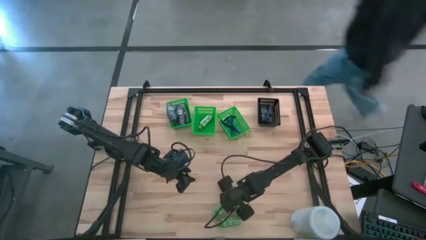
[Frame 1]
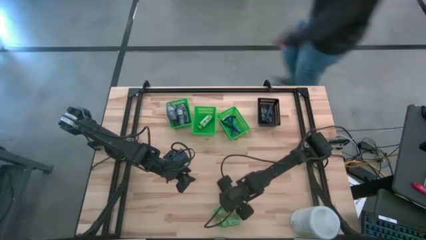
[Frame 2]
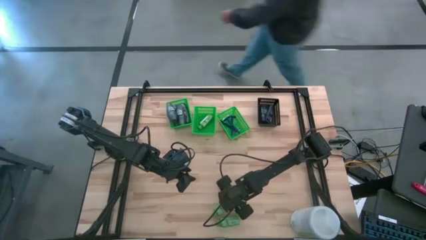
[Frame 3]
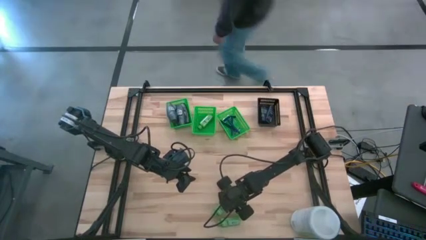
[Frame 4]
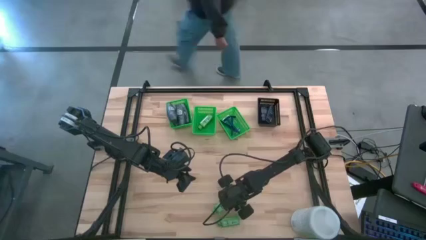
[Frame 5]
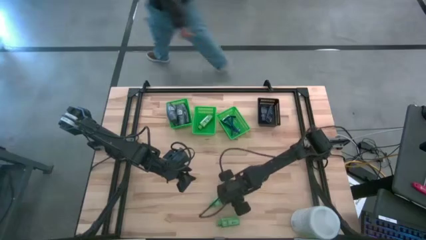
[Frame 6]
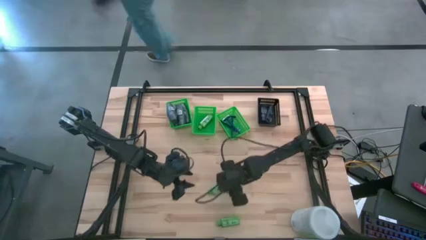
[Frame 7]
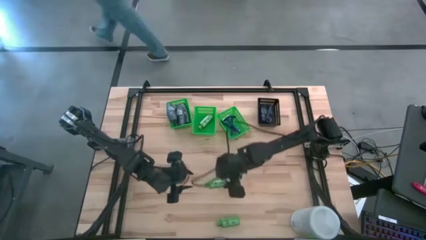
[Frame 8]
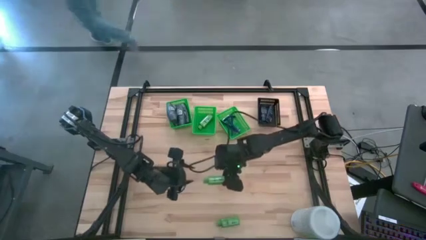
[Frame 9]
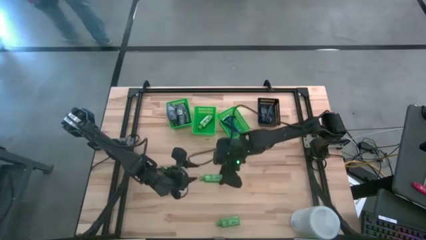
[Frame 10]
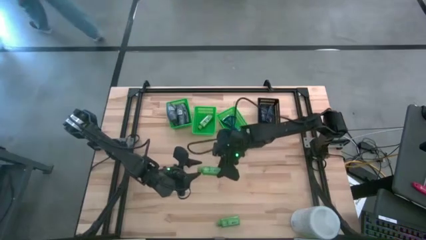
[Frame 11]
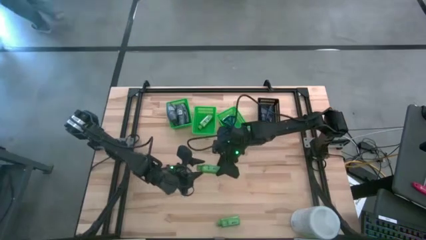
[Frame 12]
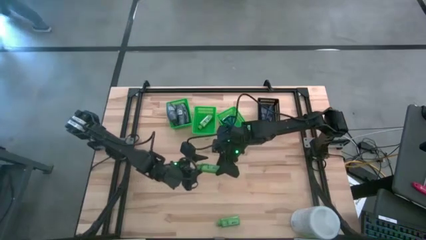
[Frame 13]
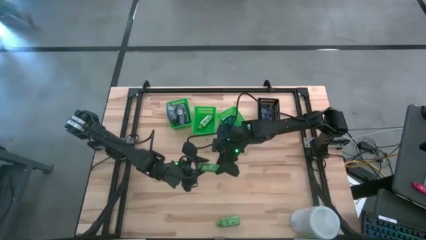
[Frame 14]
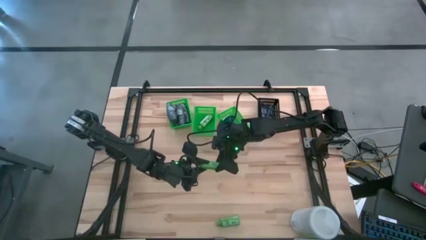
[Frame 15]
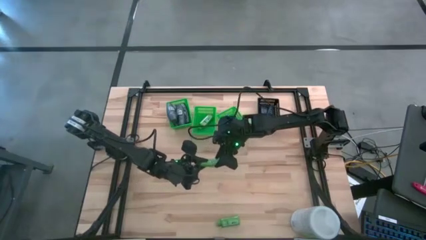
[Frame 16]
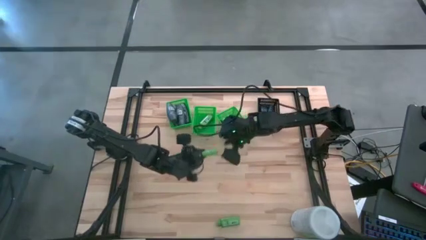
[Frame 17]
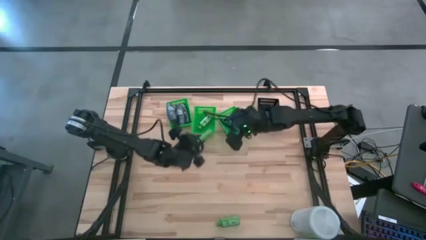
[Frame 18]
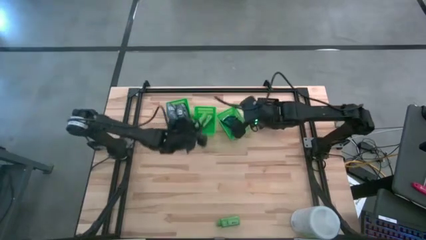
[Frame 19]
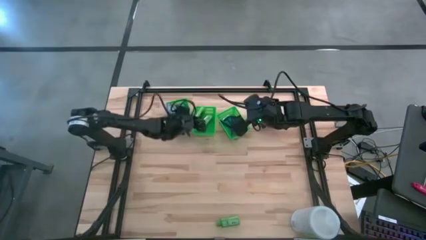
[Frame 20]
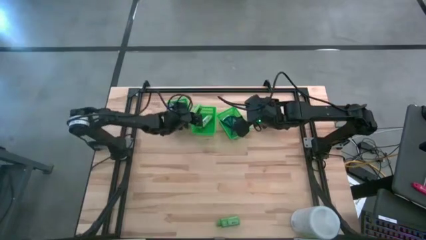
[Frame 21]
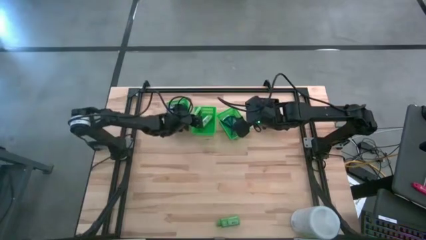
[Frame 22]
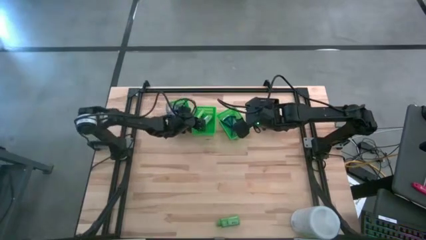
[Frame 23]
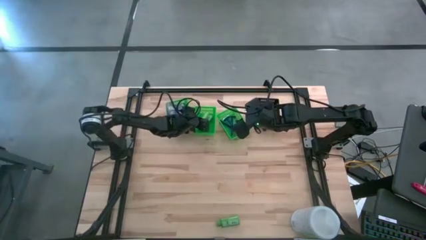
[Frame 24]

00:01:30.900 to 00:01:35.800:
Task: Pick & Place Travel size toiletries
Put the shampoo into the middle green bin

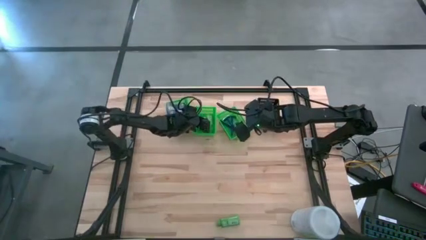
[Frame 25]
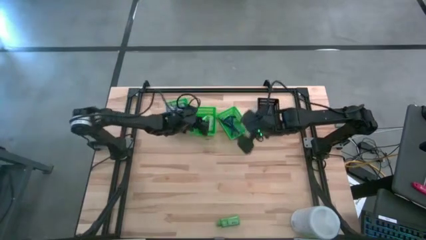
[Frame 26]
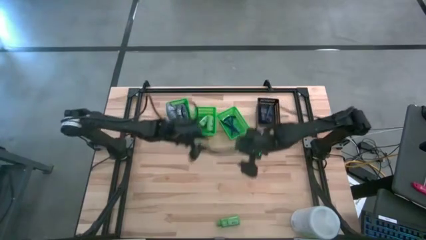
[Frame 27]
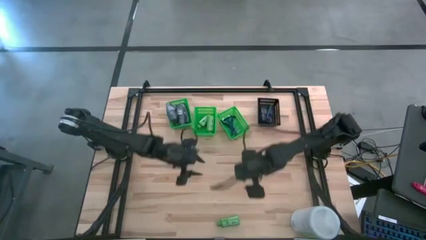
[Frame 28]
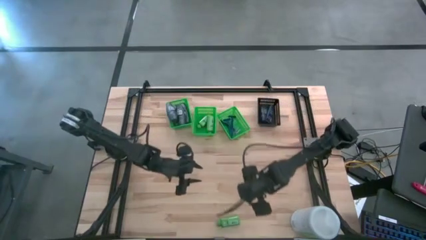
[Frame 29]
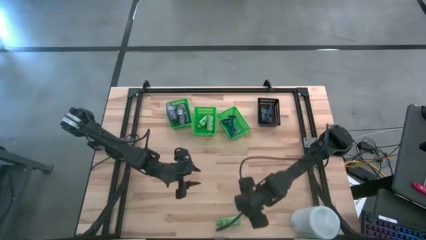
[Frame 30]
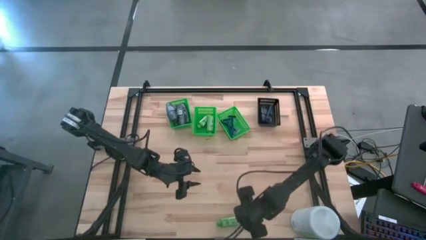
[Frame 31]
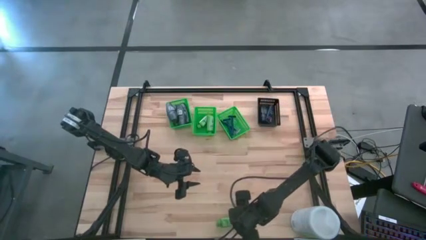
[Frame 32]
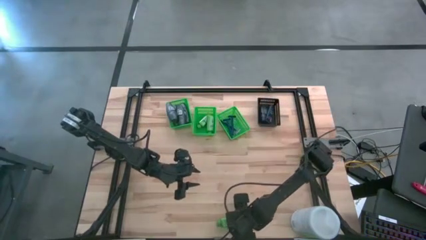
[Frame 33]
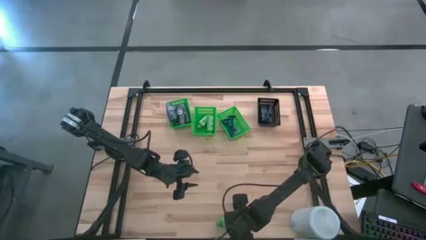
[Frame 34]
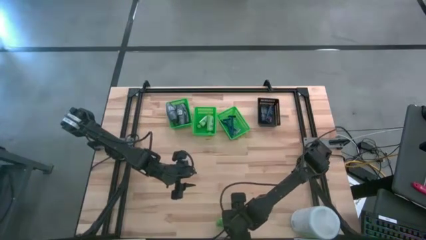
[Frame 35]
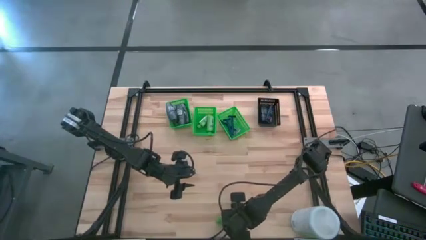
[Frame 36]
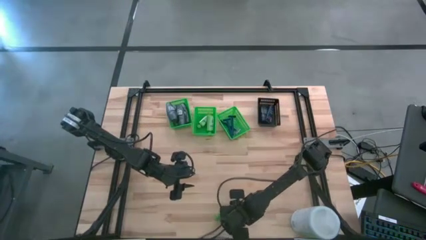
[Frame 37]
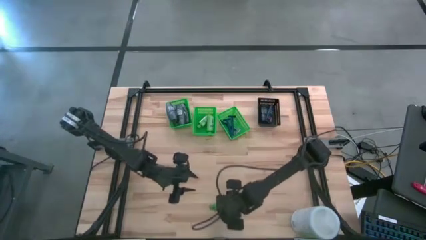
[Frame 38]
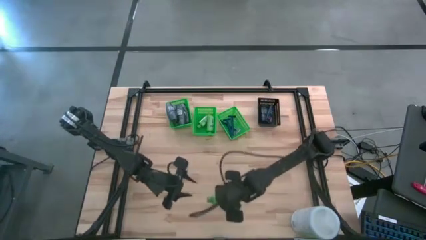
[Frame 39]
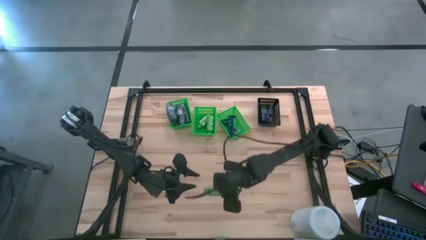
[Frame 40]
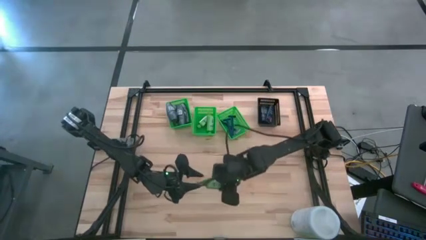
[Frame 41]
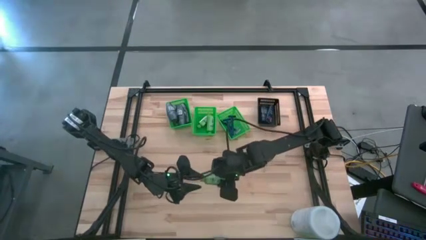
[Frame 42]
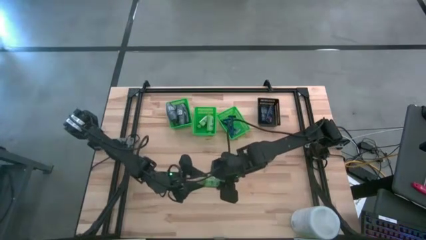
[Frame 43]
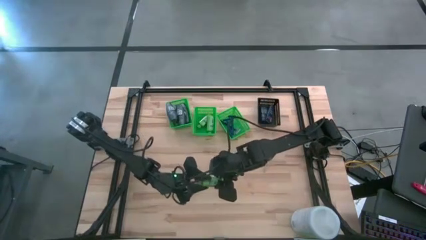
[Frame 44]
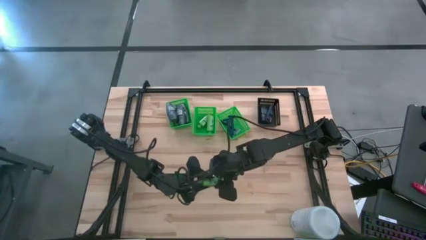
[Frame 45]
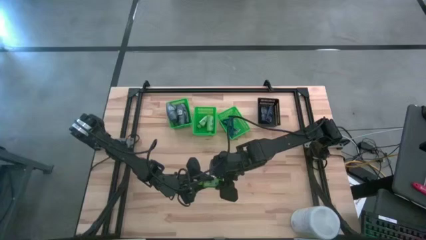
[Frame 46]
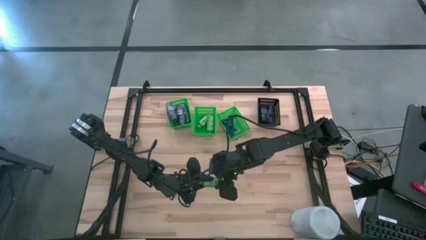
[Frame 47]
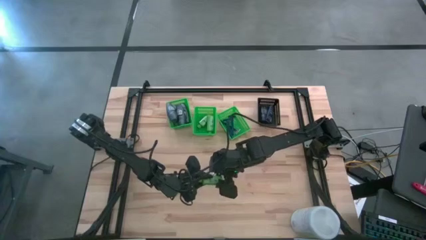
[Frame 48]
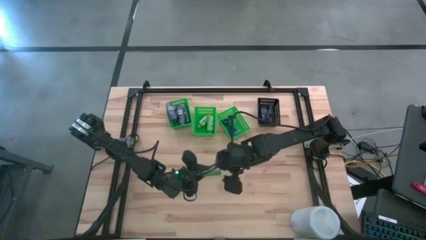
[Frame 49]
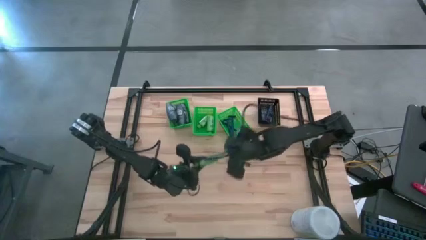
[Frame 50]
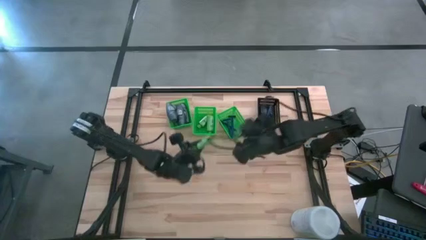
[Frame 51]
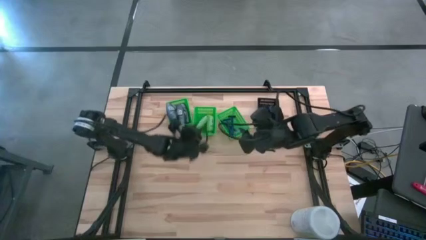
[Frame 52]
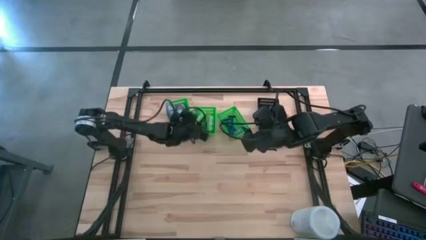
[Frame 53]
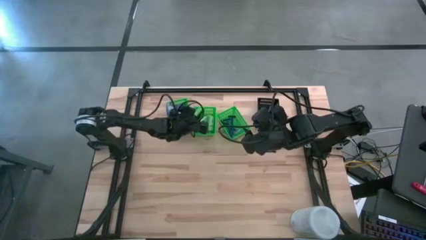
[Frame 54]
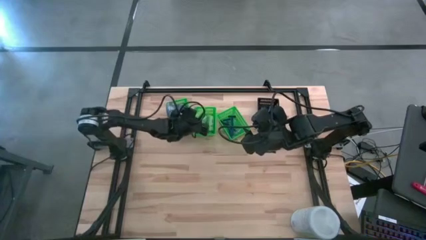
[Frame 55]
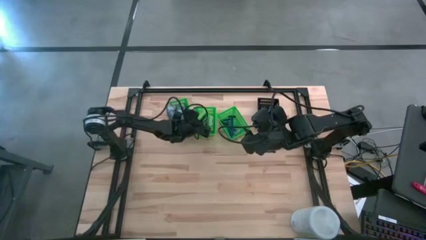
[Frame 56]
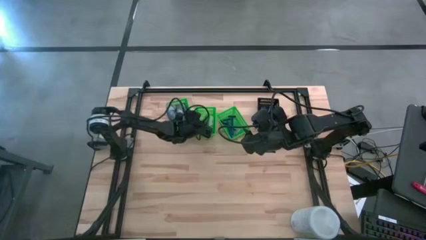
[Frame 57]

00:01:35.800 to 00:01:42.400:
Put the shampoo into the middle green bin

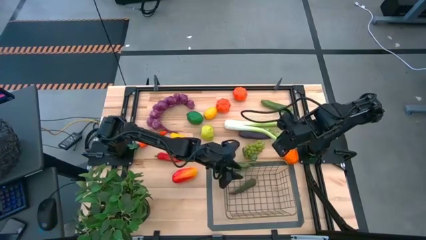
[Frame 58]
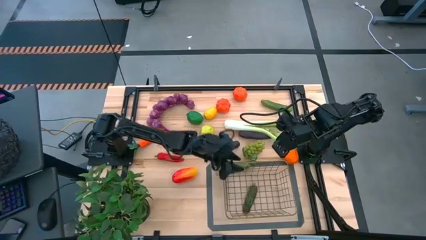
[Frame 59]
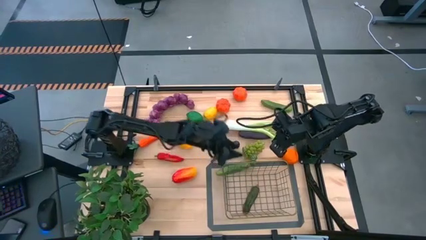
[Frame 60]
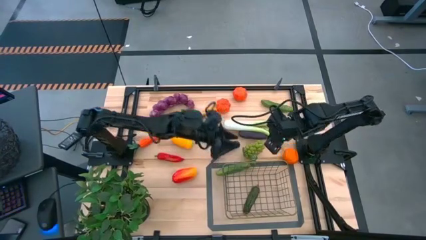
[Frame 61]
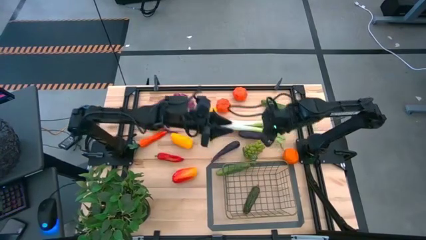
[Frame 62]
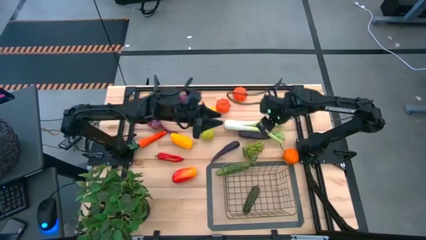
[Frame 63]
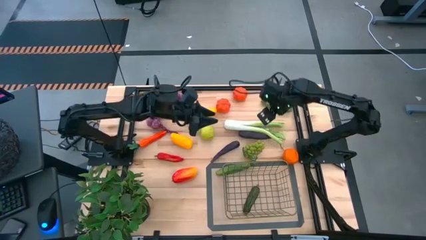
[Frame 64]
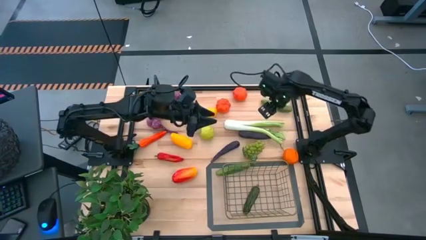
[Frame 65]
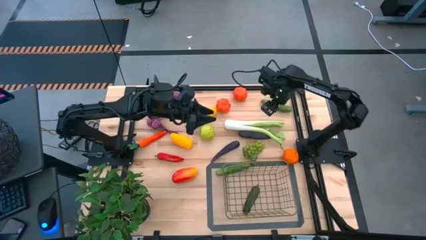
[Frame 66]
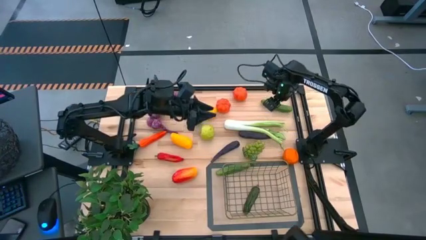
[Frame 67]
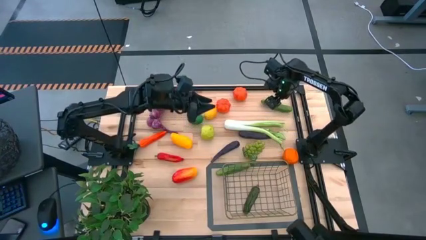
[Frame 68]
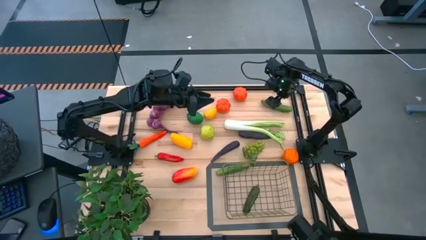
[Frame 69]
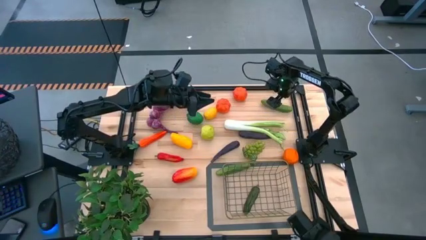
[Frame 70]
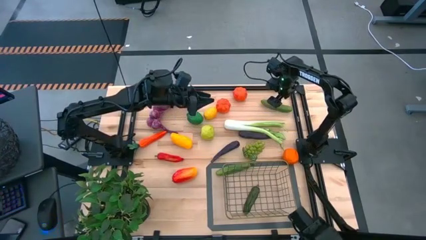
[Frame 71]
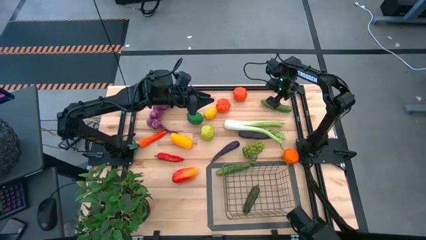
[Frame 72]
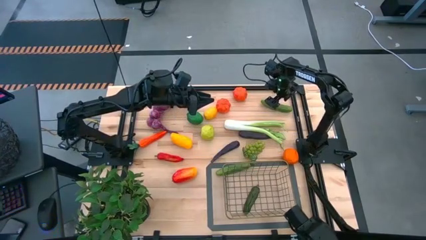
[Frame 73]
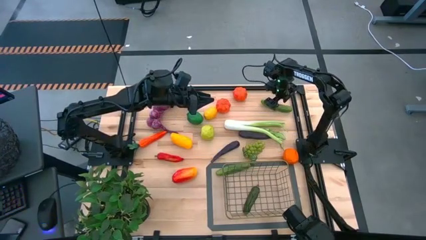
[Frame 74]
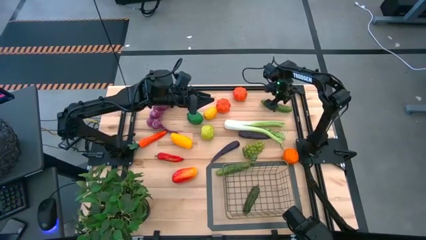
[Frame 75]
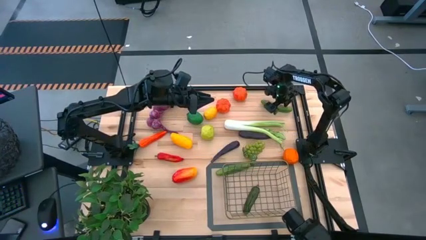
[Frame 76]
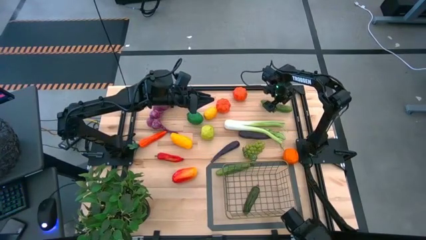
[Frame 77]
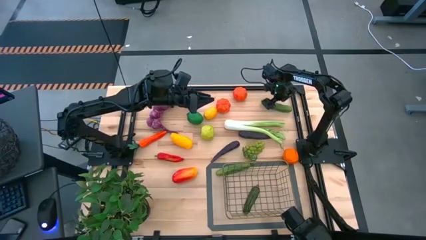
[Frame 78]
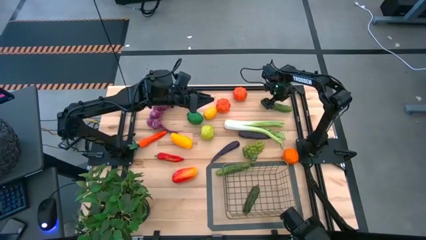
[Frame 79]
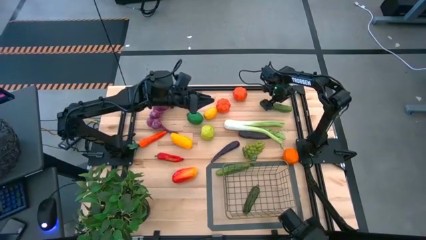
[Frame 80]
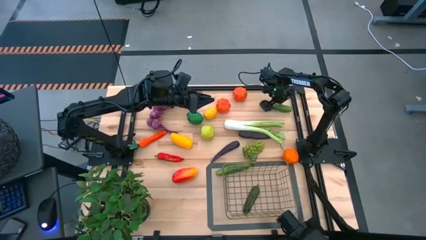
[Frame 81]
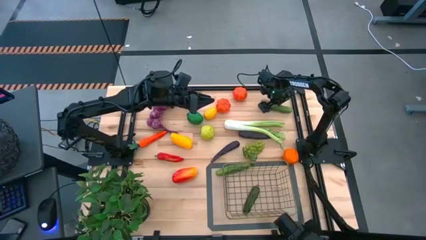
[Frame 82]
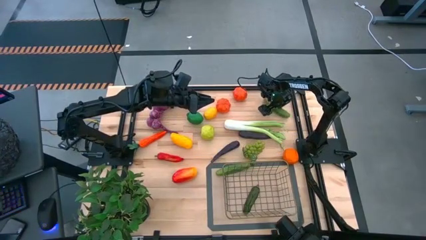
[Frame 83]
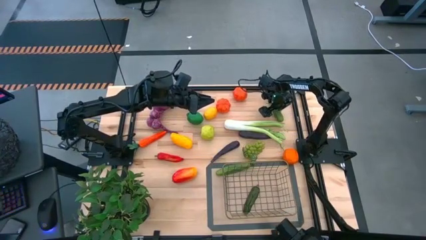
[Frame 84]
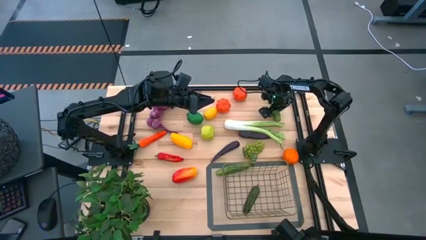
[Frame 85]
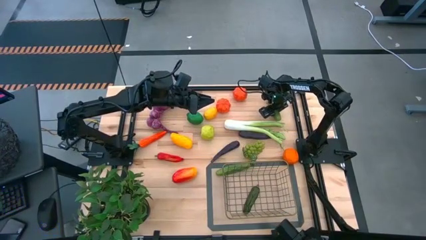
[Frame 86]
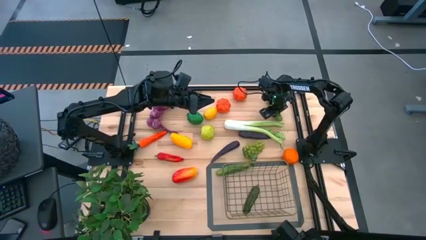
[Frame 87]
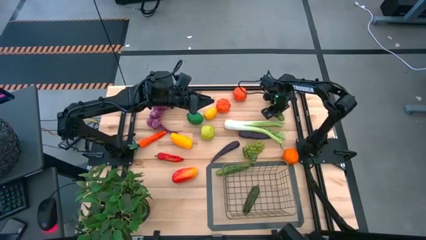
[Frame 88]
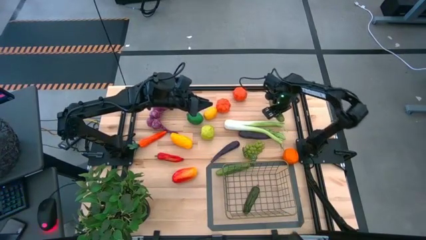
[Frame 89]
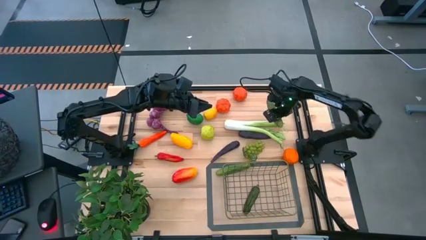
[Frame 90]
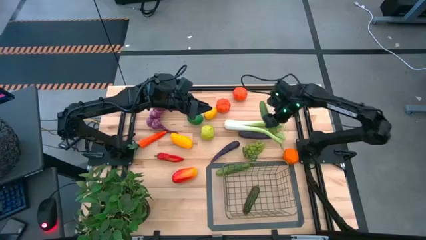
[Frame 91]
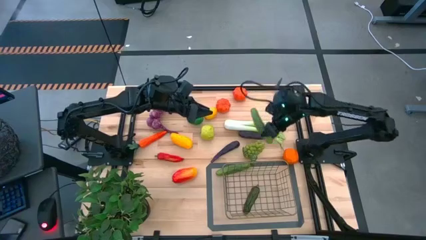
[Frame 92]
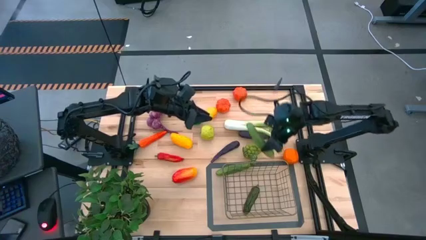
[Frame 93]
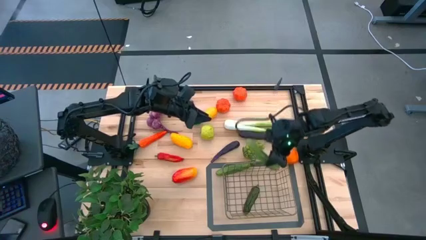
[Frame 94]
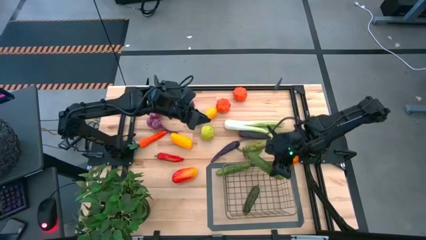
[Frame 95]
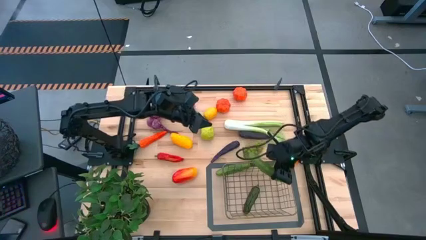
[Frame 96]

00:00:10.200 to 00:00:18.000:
Task: Build produce basket
Put the top cucumber into the wire basket
